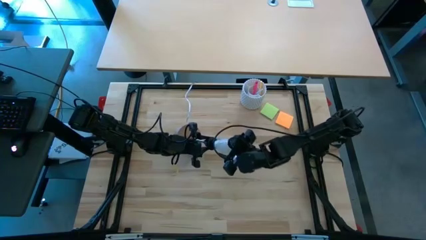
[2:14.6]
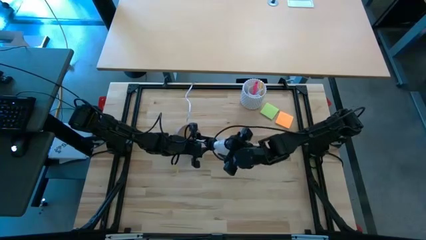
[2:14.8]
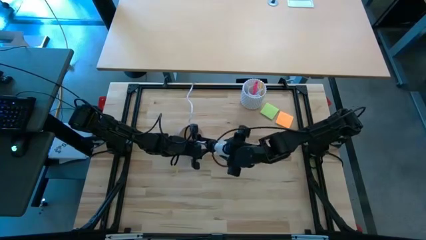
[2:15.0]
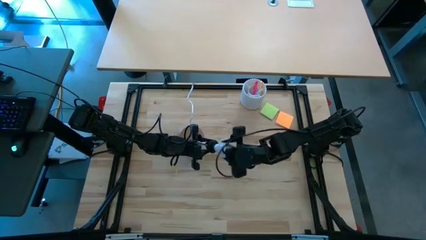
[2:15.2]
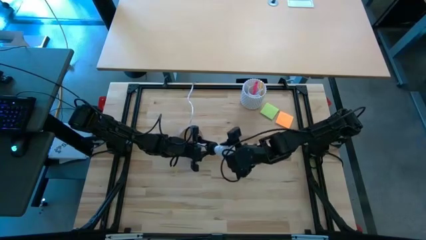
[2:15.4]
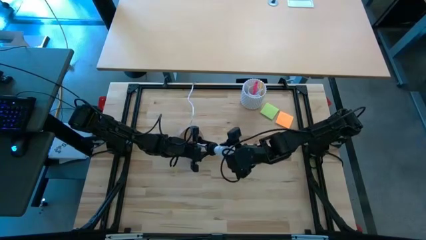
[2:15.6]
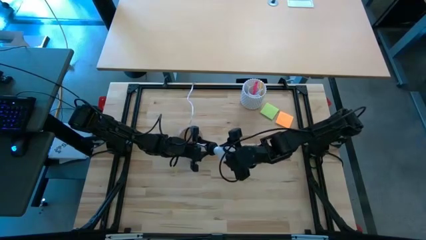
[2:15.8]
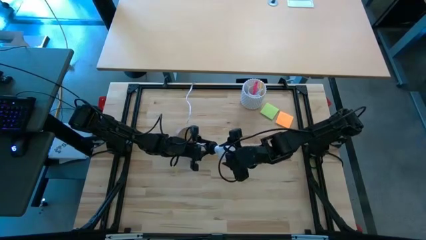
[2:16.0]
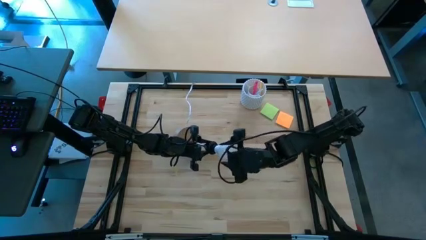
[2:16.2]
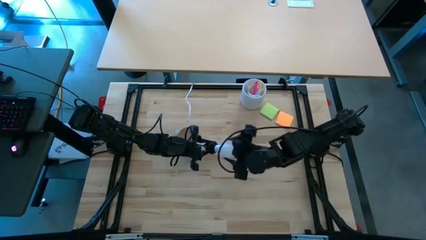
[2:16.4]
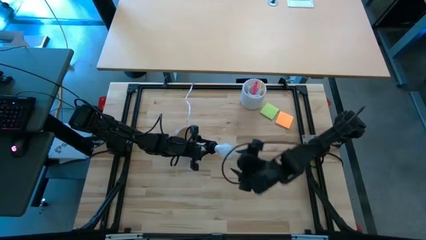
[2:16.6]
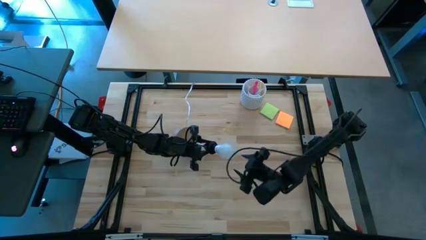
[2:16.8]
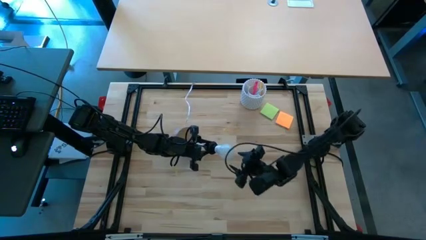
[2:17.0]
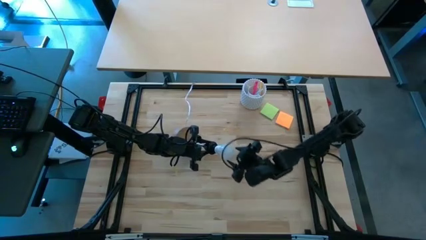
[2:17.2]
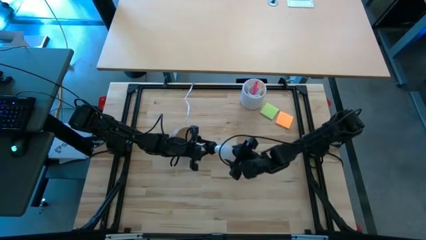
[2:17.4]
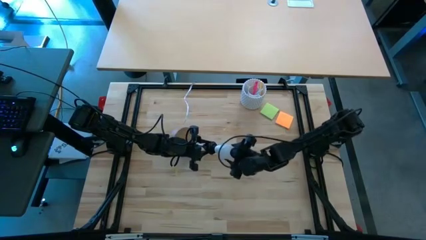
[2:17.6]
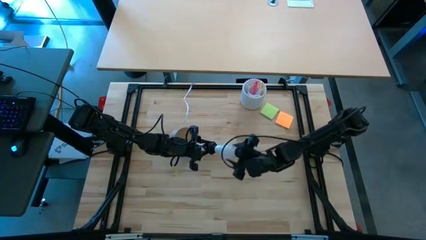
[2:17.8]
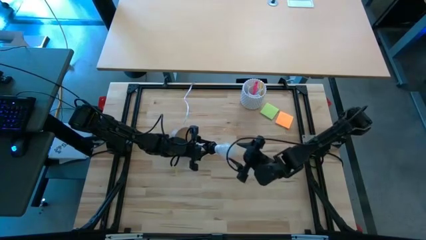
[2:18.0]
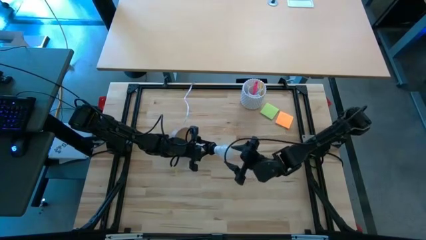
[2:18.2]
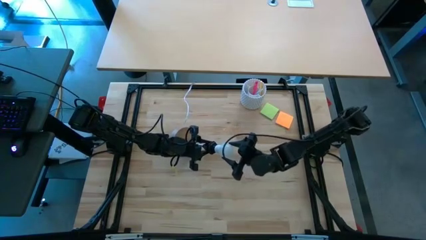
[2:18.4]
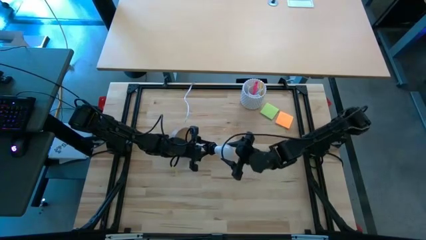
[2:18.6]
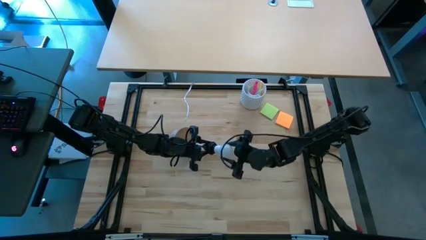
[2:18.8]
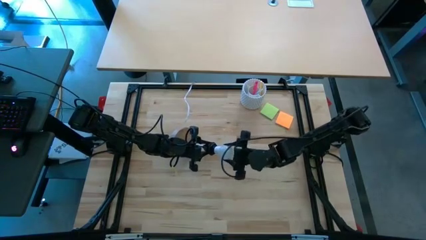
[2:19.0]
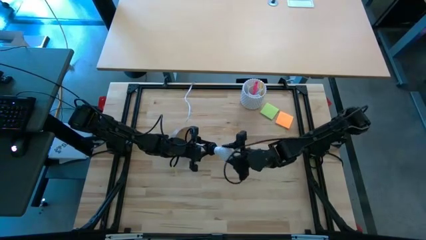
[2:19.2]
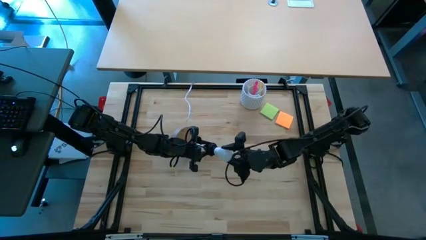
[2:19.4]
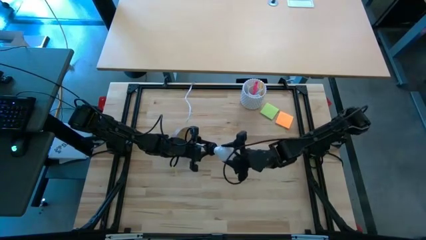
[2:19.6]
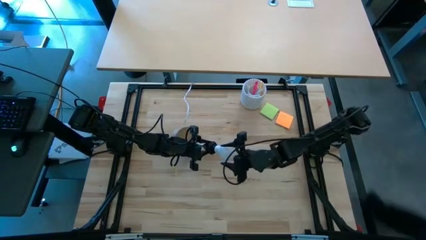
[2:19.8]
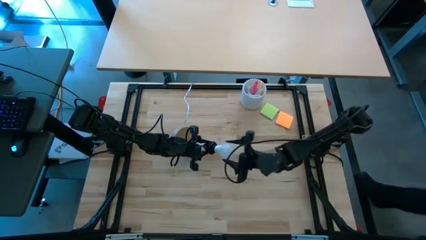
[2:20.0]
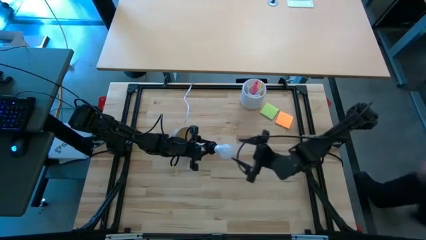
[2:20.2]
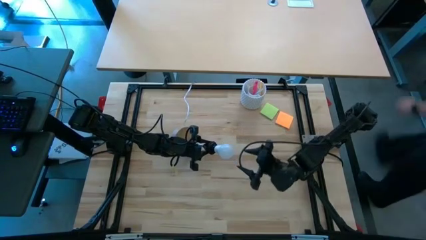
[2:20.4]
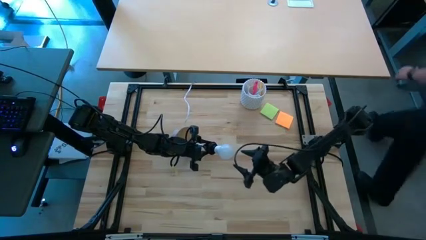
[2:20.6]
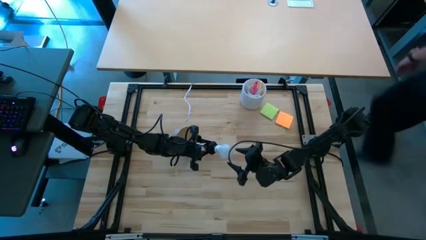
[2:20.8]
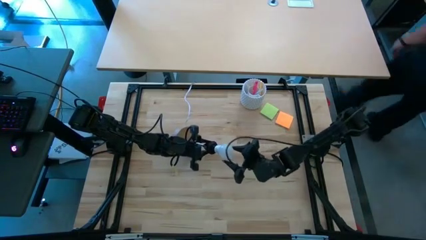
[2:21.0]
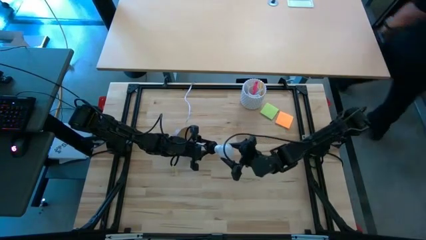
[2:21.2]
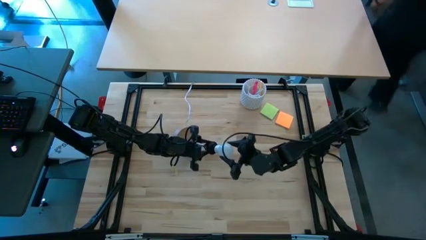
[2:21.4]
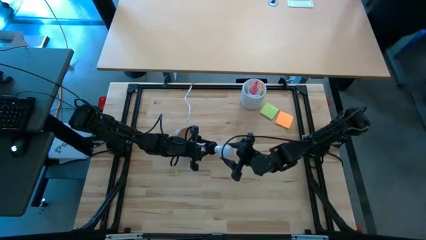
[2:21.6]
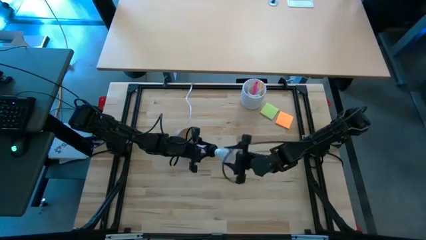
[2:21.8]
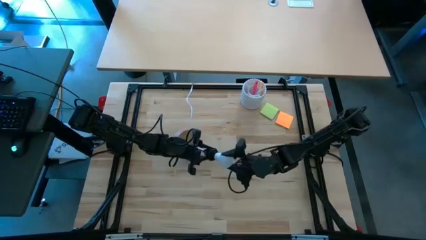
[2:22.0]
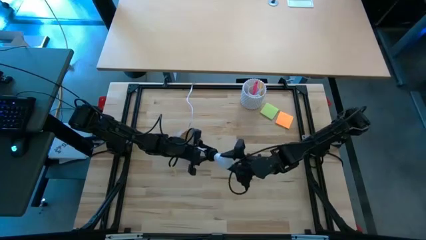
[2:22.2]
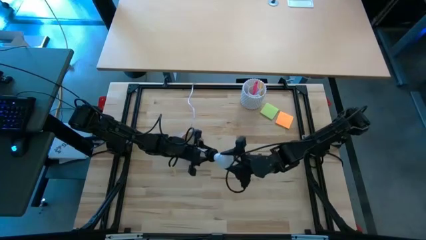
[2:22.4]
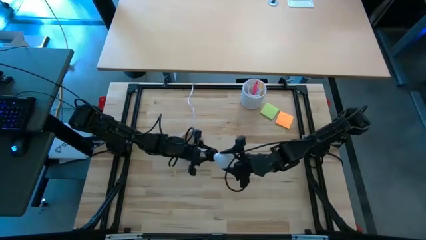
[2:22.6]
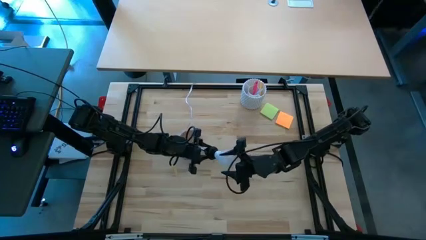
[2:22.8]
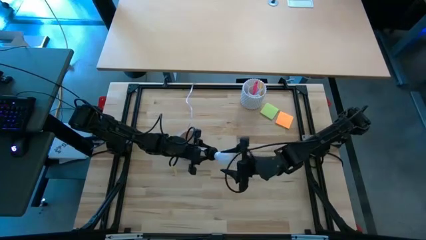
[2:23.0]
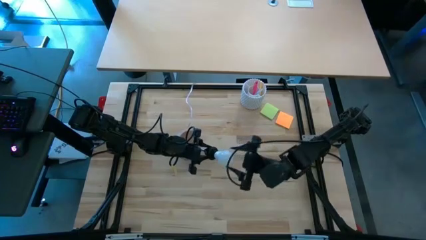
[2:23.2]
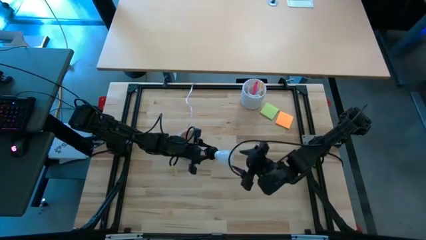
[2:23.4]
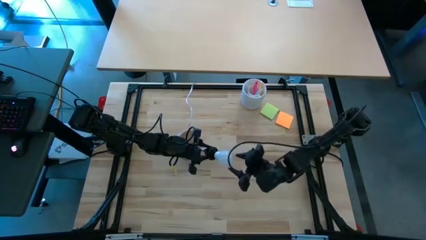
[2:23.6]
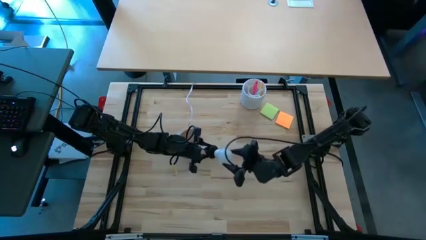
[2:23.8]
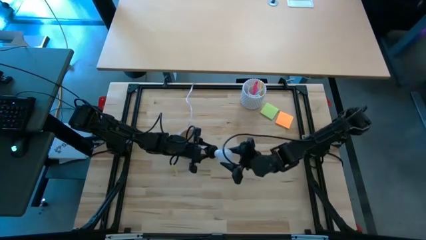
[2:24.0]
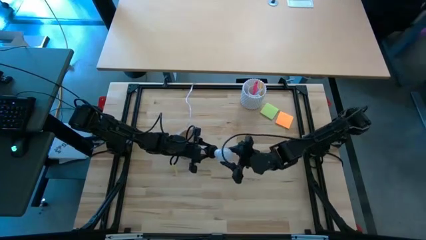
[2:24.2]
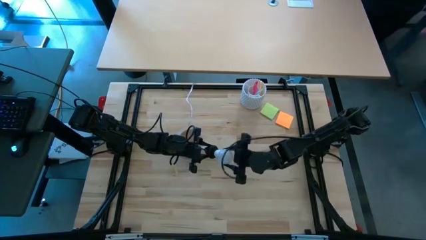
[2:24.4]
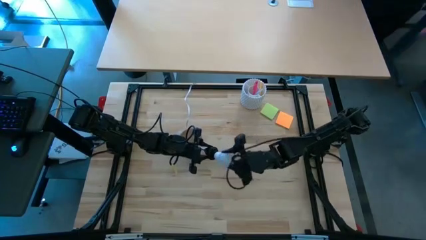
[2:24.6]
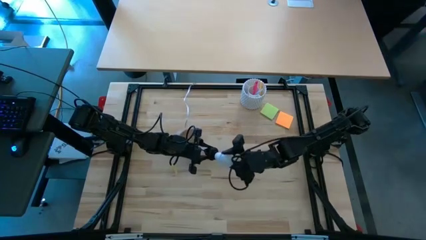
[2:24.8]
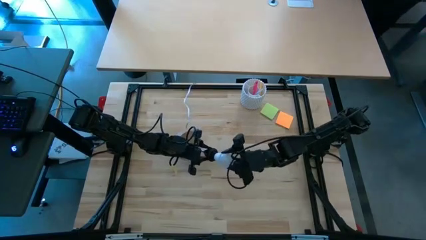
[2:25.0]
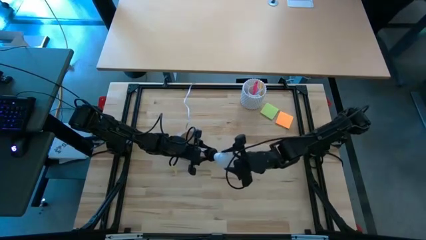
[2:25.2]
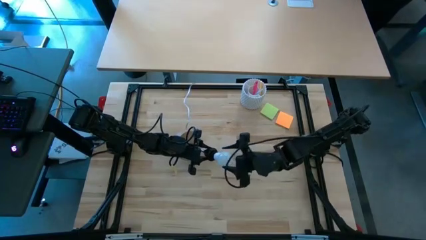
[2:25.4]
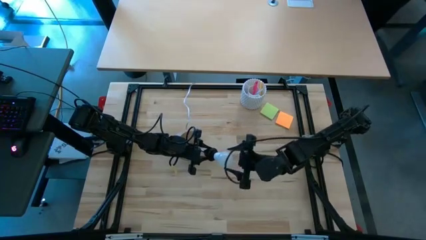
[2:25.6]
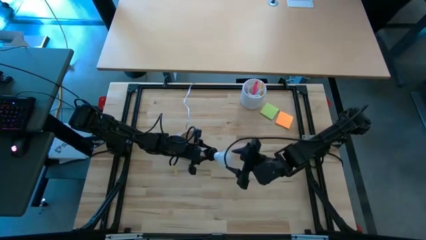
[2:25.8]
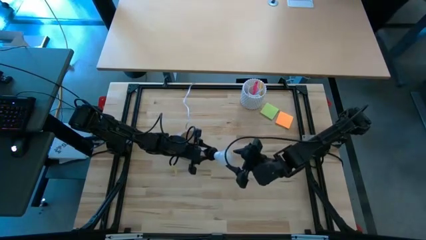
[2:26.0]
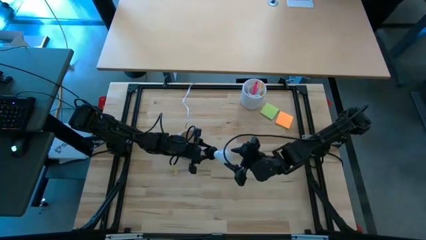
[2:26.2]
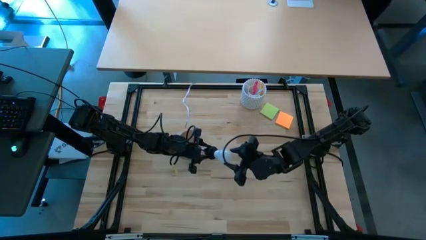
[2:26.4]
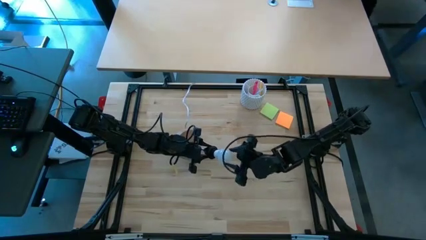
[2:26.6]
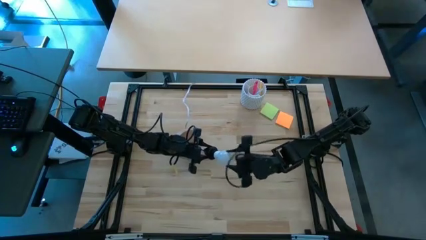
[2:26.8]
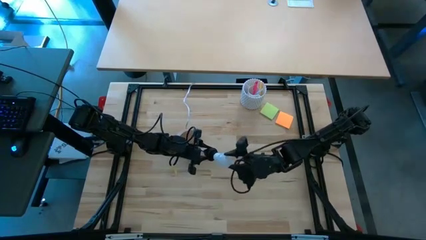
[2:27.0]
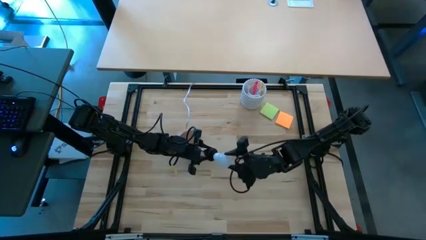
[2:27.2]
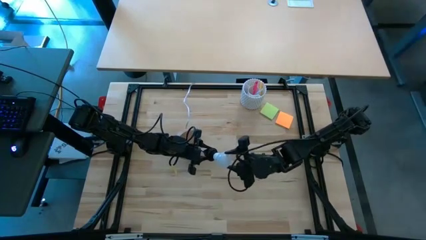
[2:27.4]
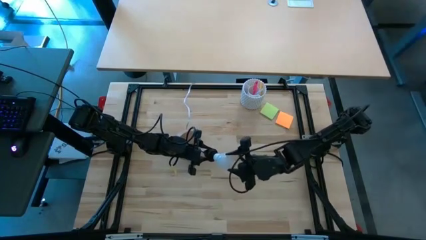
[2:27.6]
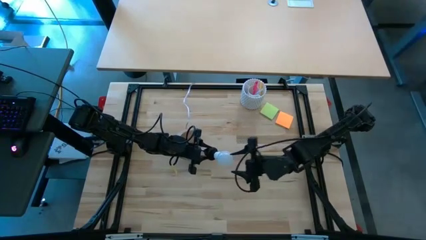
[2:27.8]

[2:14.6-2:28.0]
Task: Screw lightbulb
Remove the light bulb from the lamp

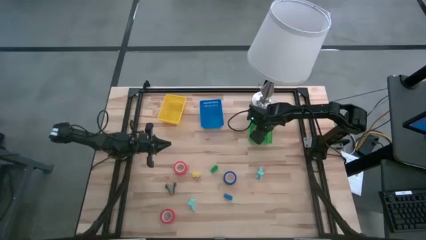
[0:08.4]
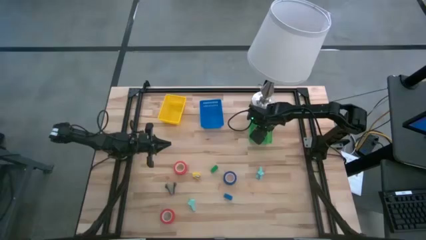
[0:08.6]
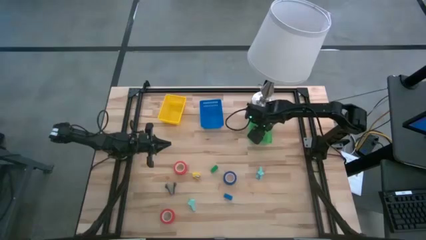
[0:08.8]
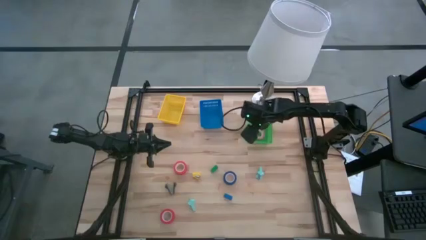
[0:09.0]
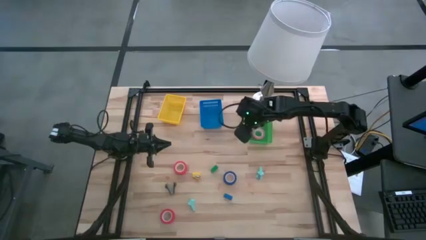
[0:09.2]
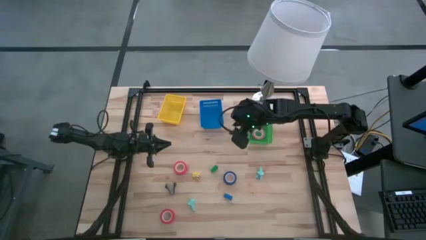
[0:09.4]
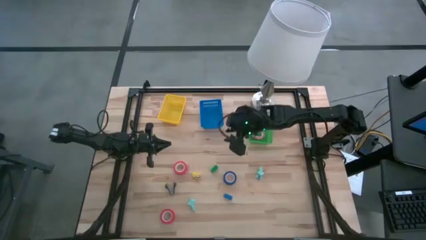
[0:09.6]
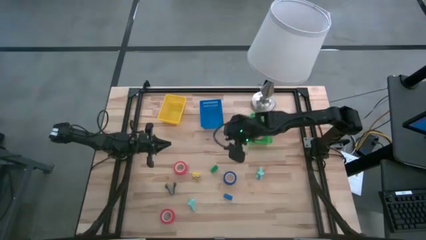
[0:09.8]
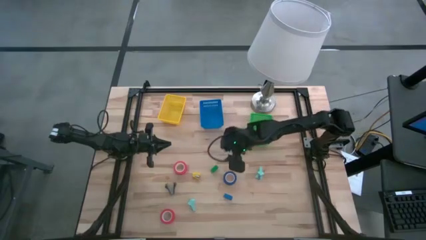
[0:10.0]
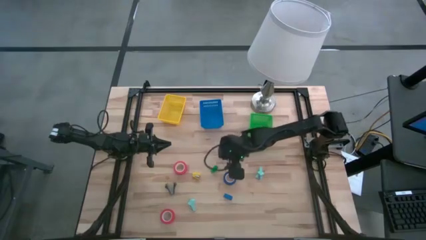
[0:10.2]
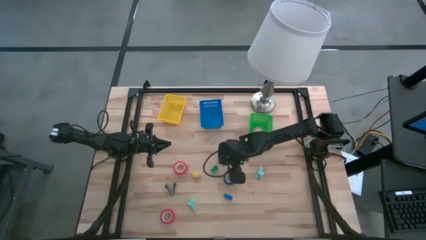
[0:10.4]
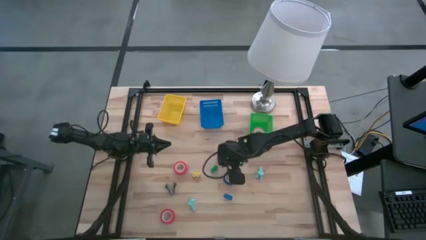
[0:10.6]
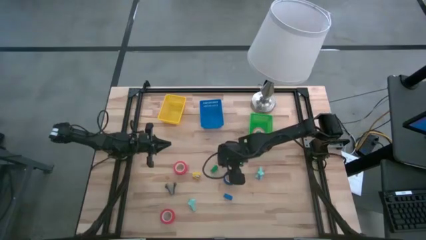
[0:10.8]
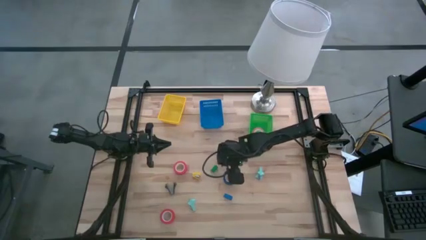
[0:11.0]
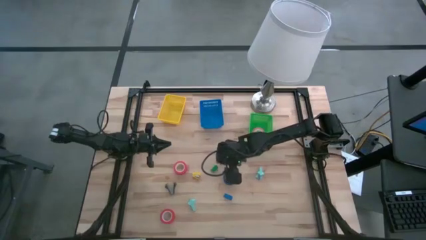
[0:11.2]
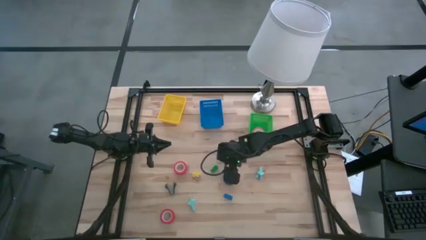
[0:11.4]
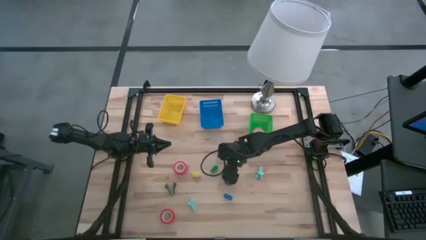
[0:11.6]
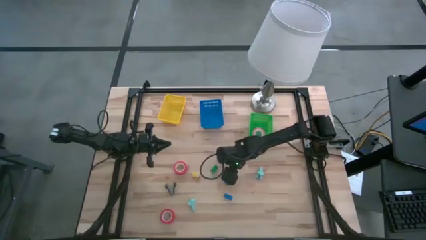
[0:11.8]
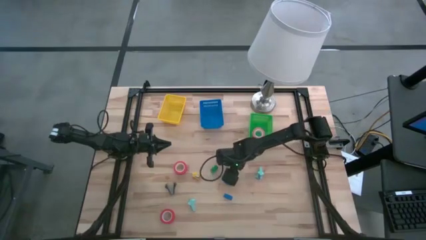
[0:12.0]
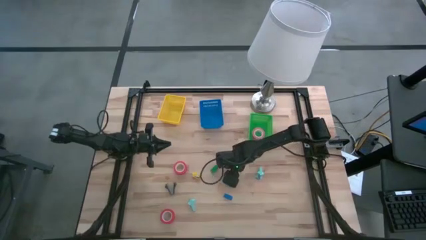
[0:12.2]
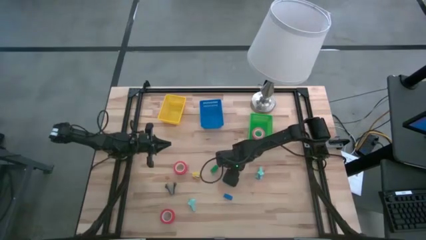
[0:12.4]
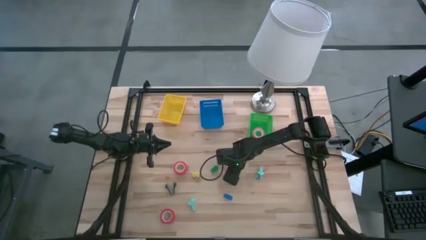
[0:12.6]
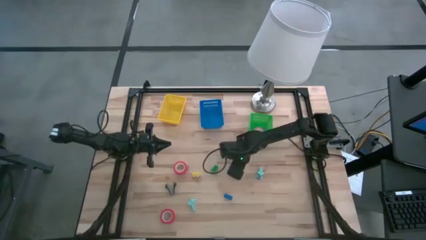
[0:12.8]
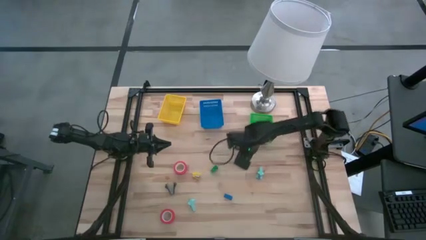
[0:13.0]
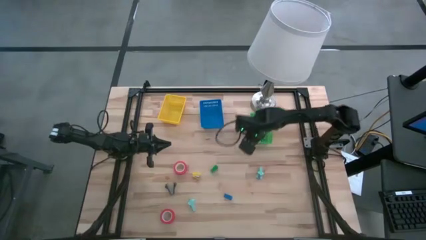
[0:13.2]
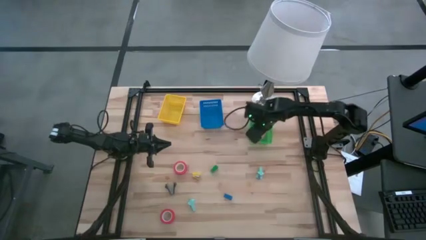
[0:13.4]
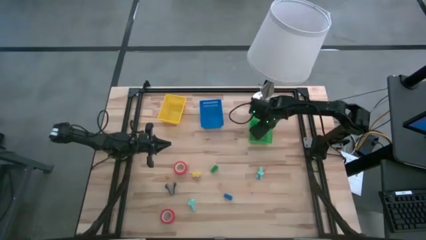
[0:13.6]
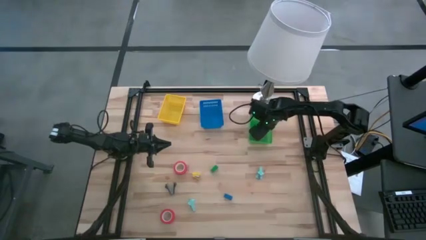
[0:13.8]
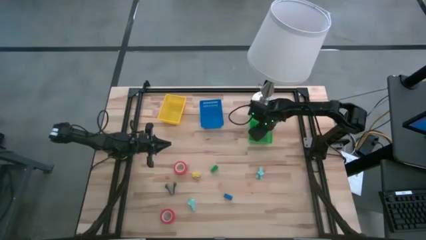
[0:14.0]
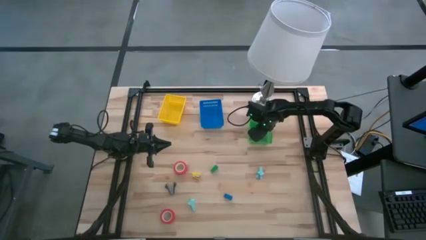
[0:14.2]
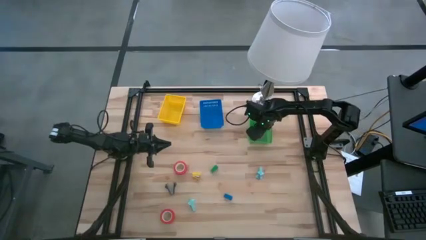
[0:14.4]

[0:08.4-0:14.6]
Task: Pick and place Stapler, Stapler remover, tape
Put the blue tape into the green bin
